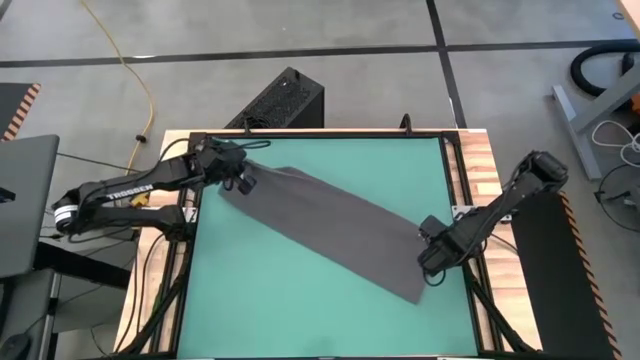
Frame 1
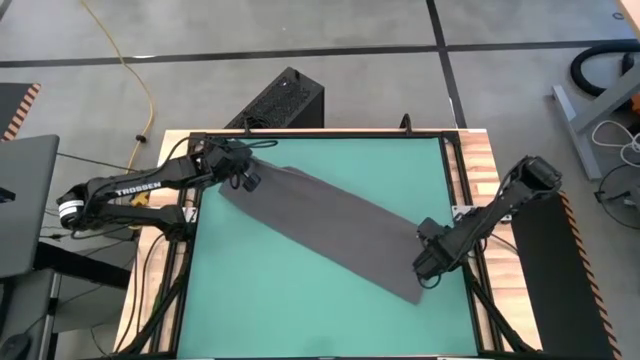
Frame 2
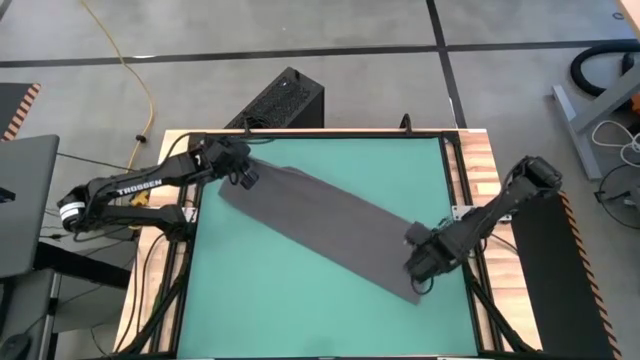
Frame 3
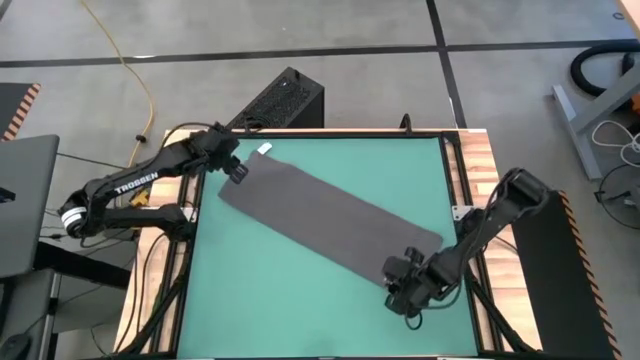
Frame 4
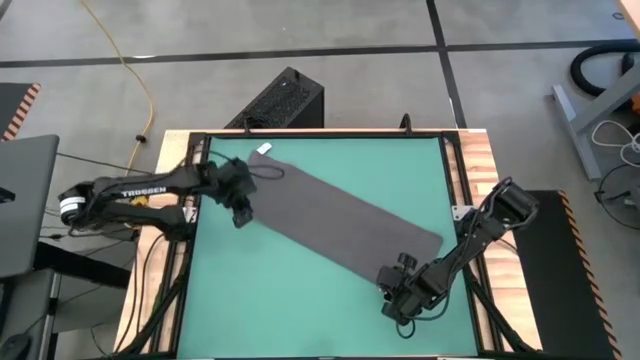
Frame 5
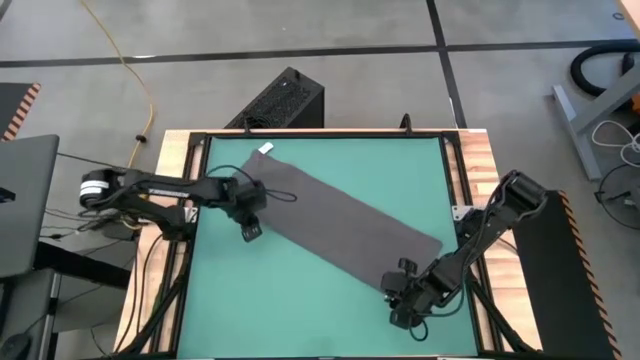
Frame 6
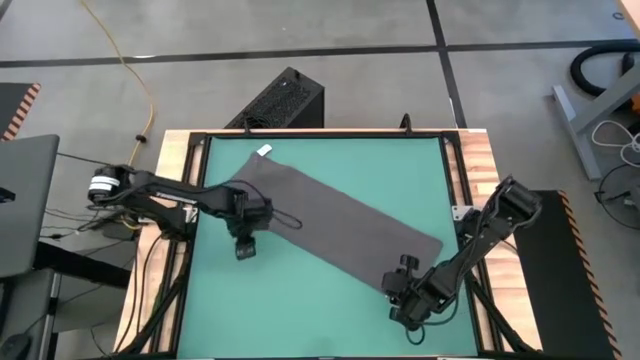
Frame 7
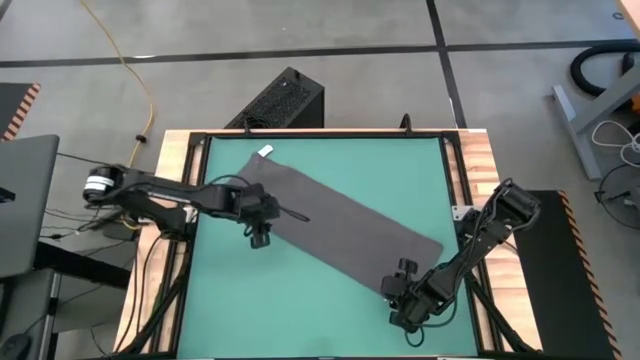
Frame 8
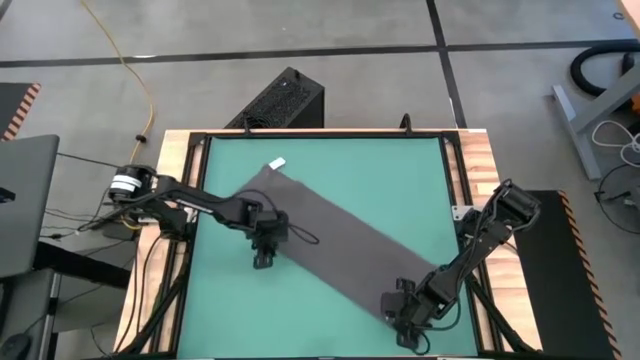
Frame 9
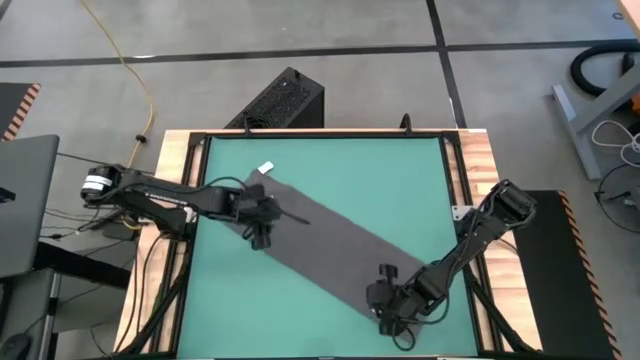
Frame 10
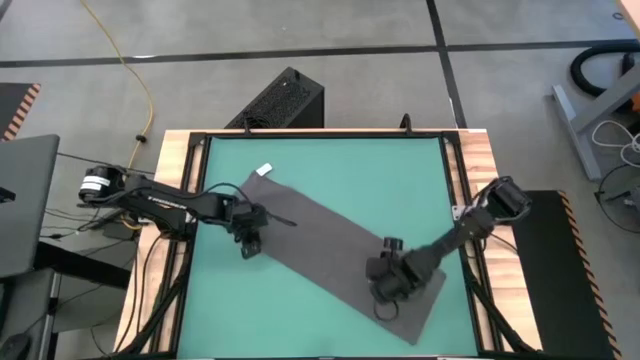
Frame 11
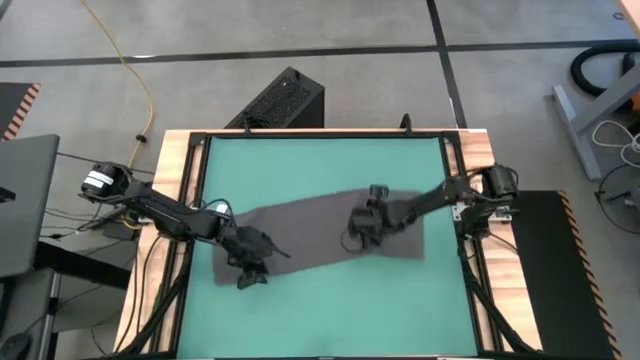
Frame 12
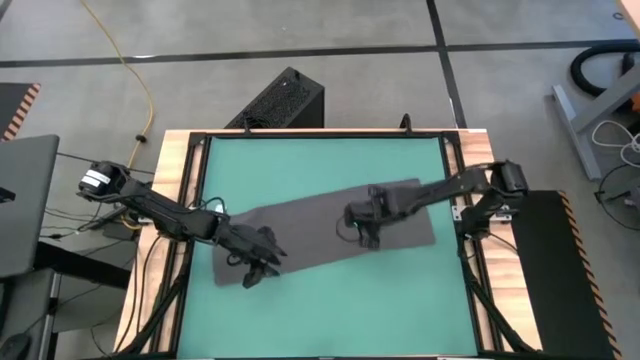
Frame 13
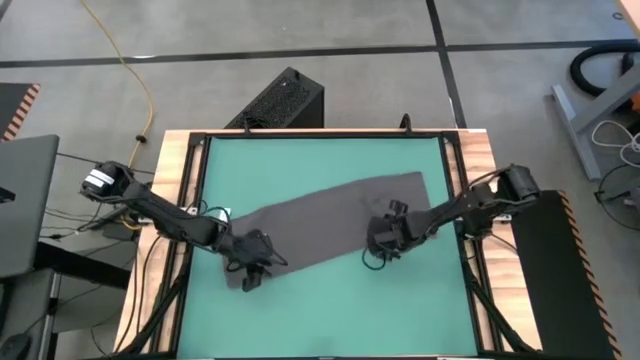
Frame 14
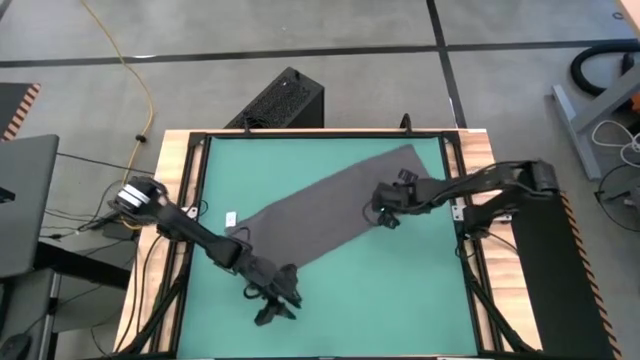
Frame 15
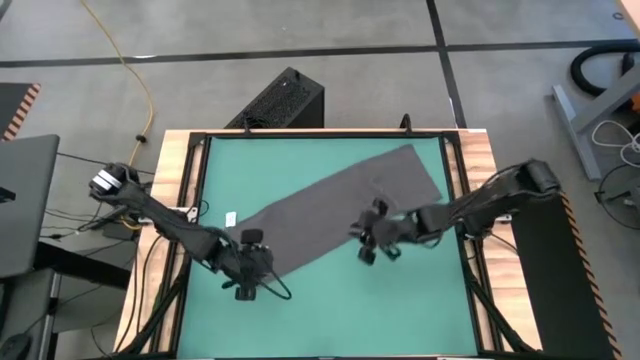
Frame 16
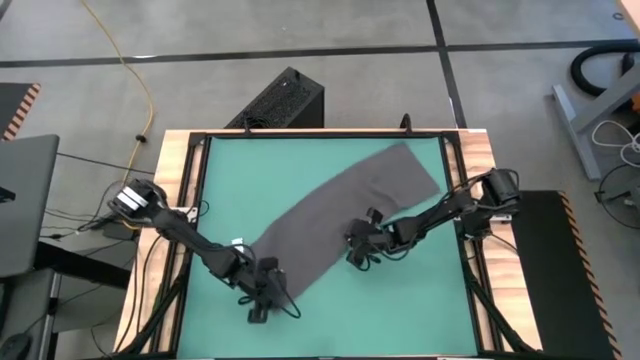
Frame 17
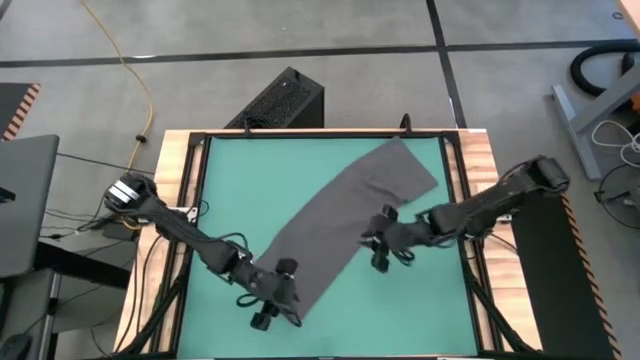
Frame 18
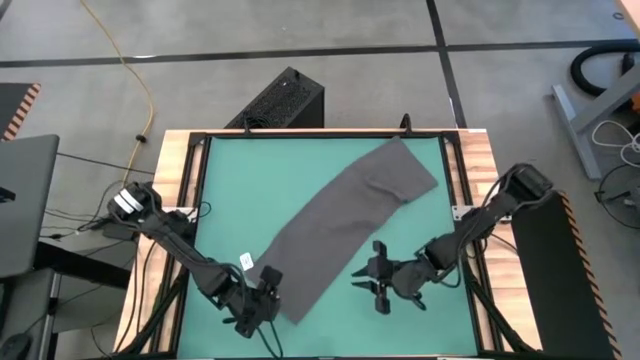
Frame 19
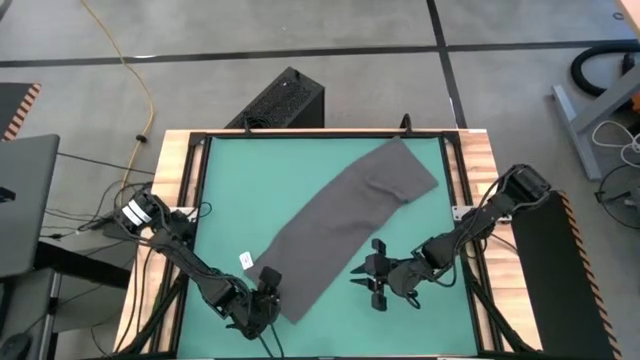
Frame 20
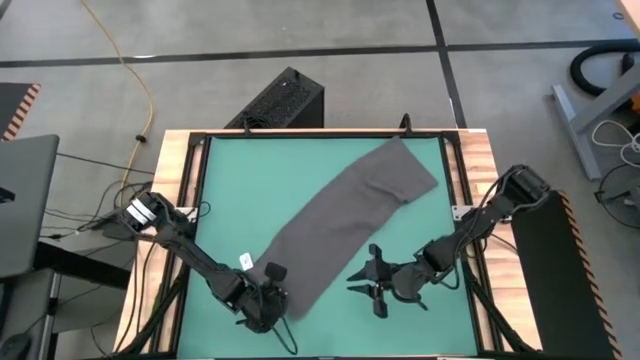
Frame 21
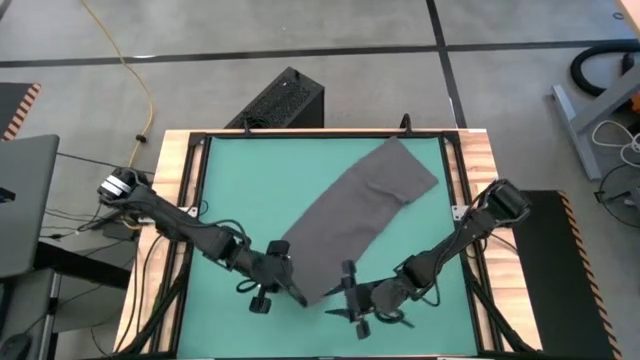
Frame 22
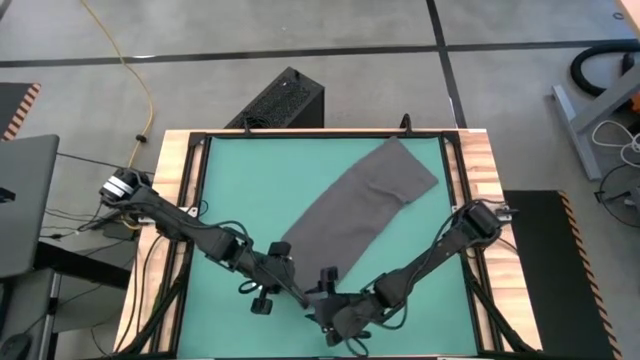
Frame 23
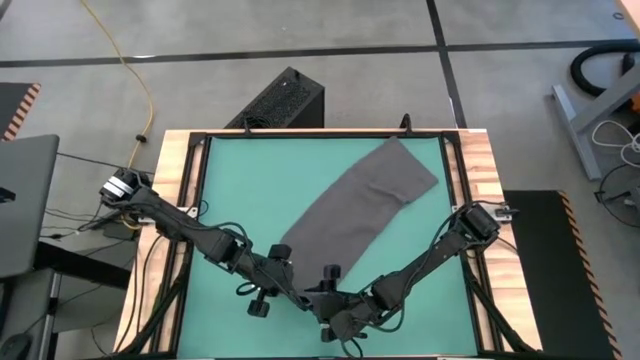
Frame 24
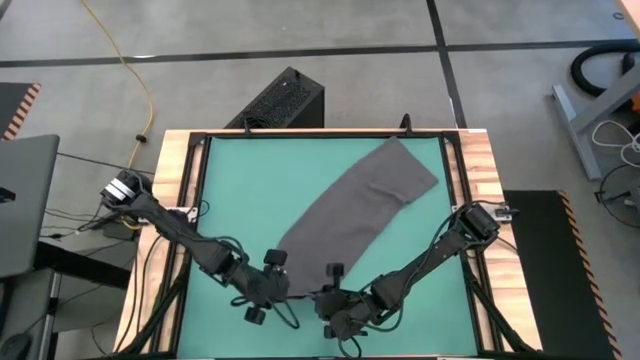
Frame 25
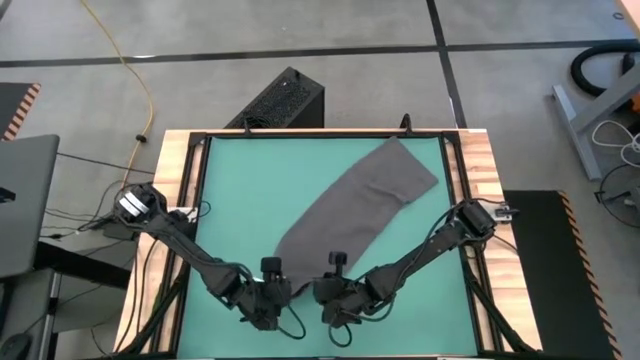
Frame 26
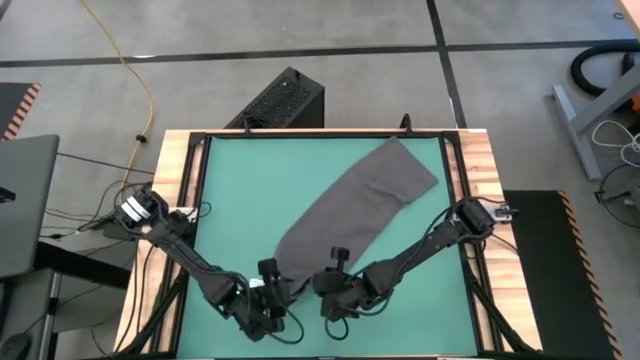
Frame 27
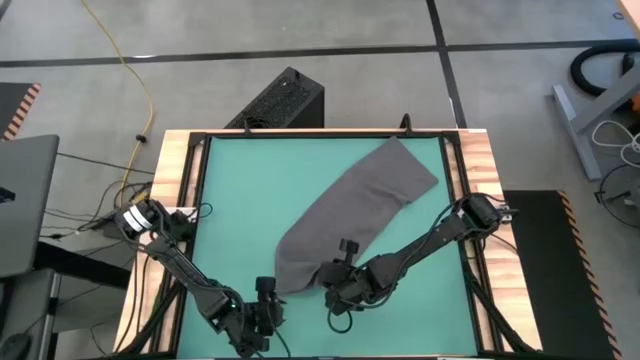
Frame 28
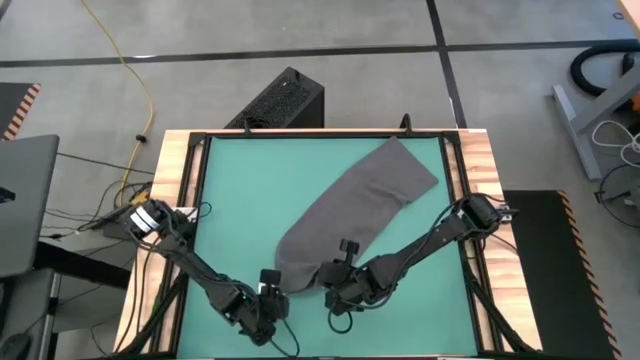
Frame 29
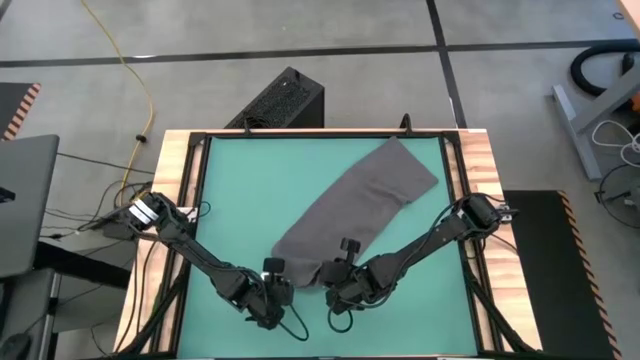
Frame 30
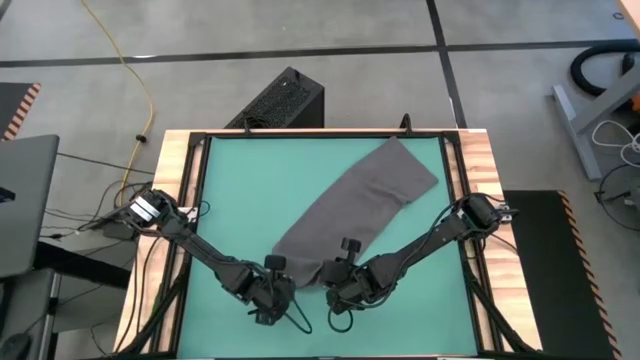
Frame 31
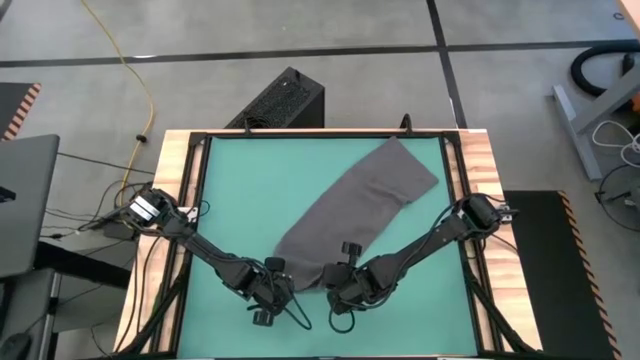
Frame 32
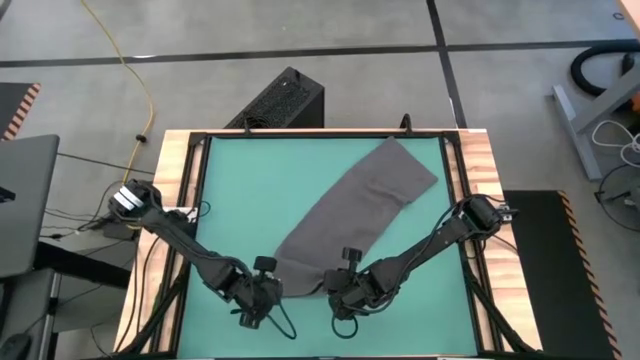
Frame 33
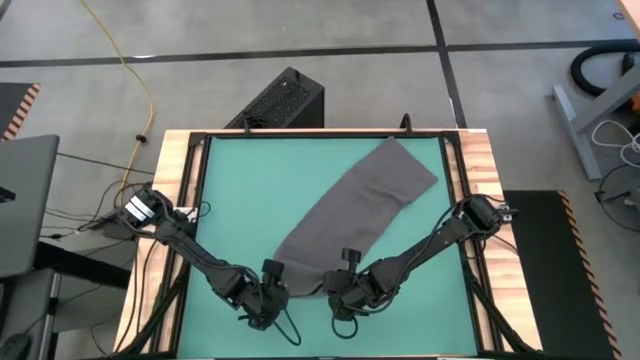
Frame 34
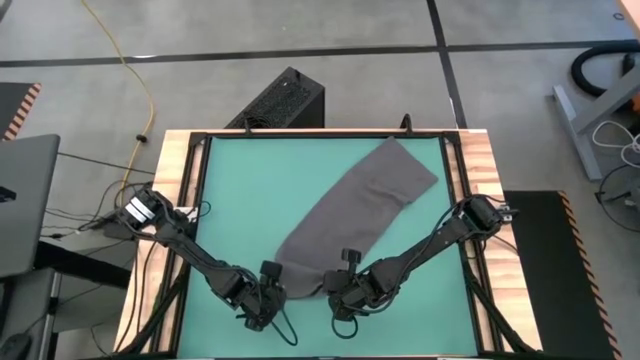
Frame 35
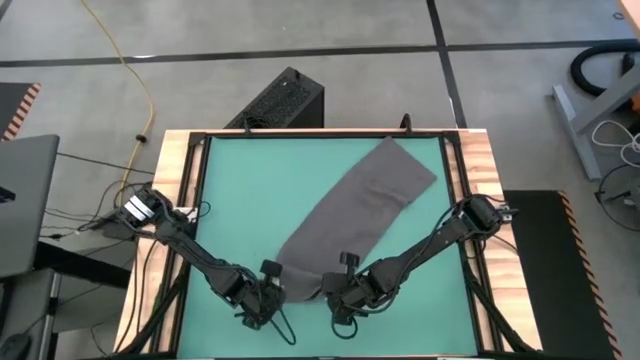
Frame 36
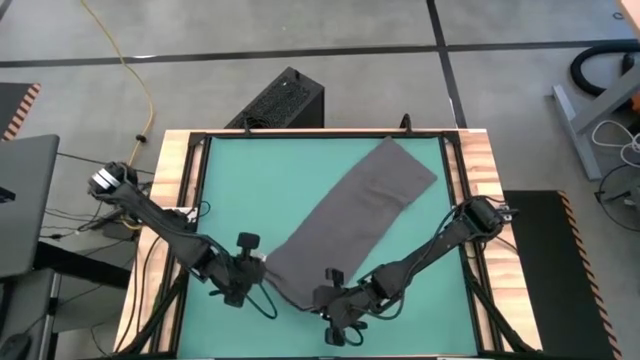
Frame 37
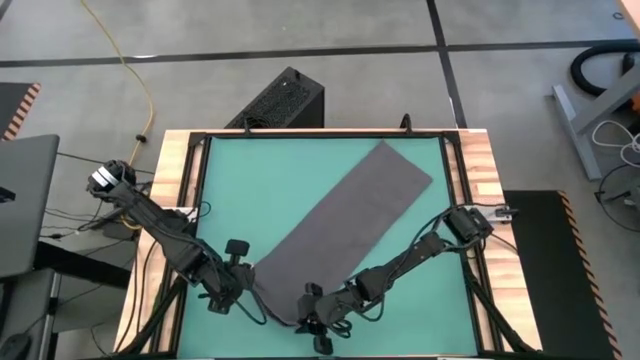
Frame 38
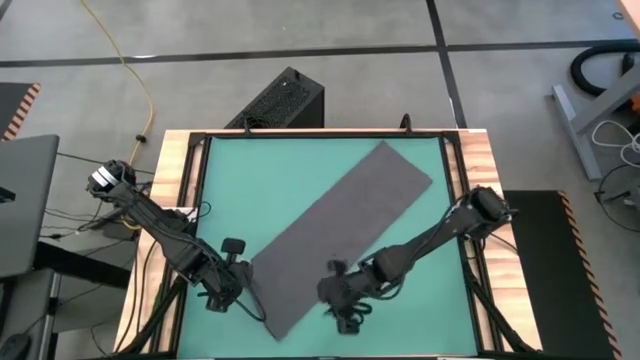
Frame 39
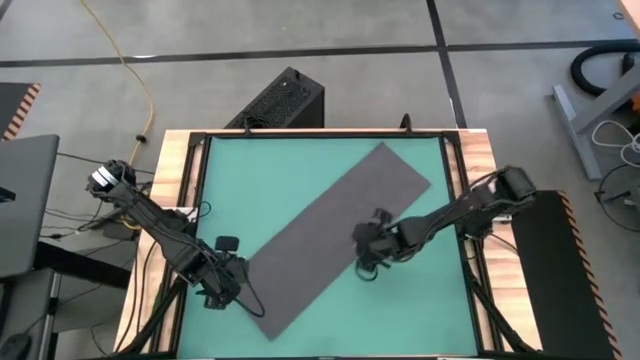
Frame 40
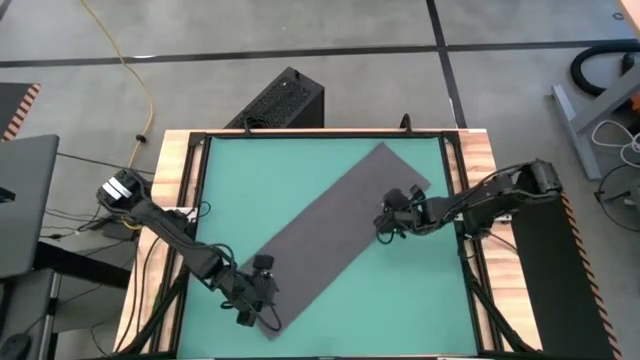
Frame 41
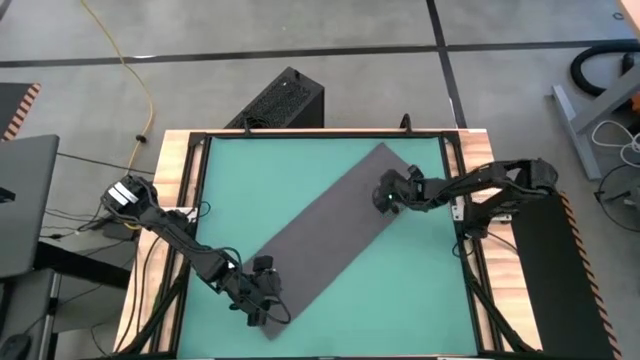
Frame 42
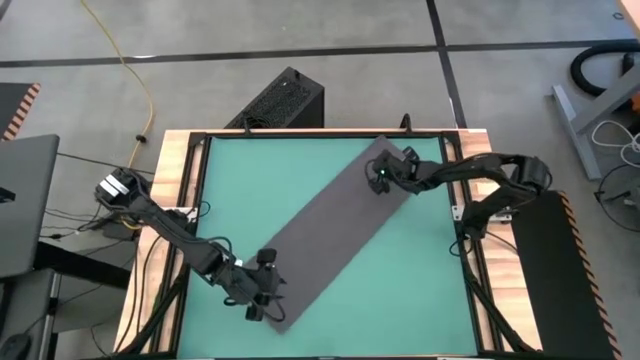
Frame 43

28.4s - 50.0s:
Task: Roll towel
Roll the gray towel

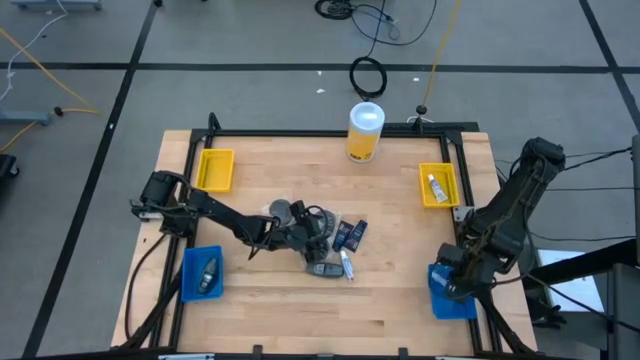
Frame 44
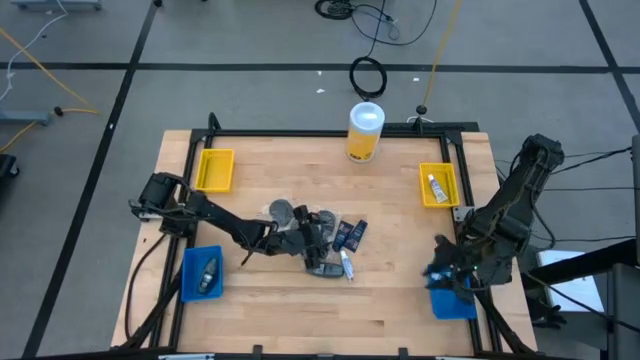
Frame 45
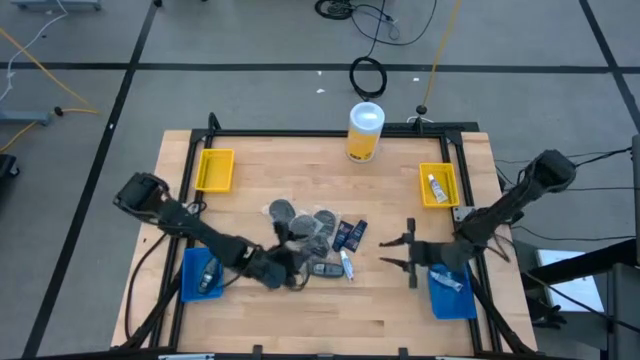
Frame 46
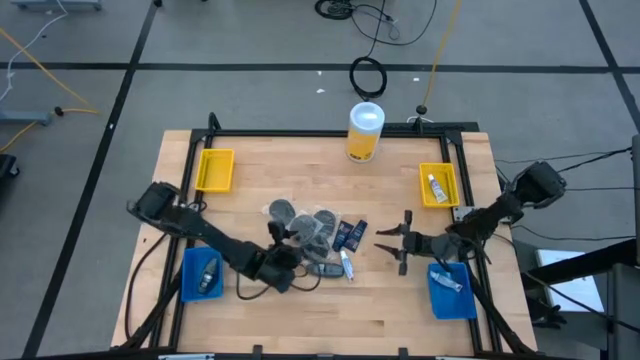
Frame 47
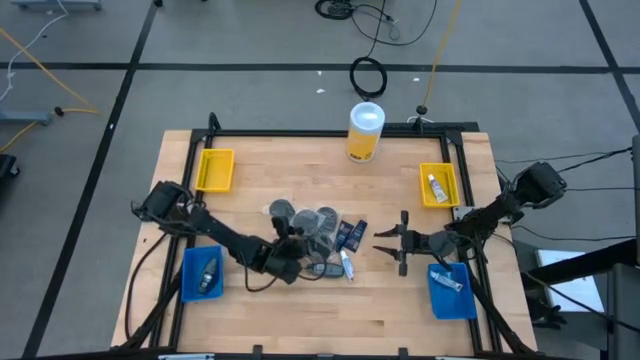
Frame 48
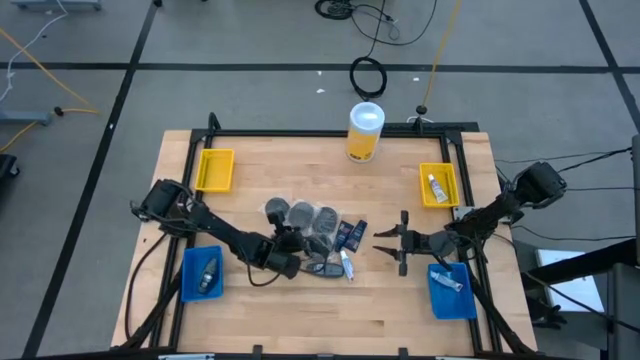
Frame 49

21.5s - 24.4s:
Task: Pick & Place Travel size toiletries
Put the black hairbrush into the left yellow bin
